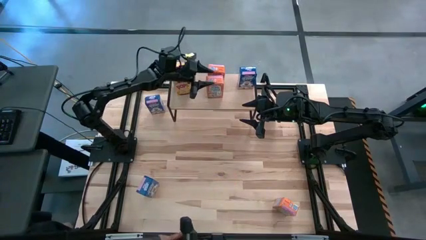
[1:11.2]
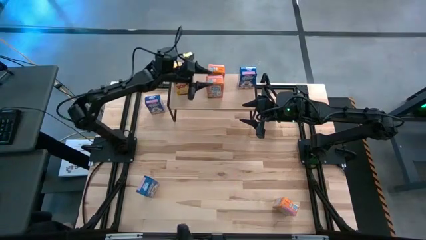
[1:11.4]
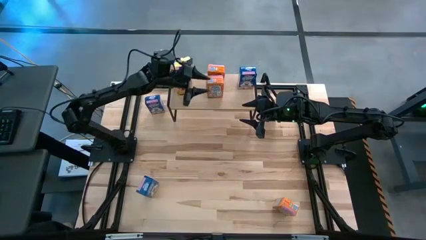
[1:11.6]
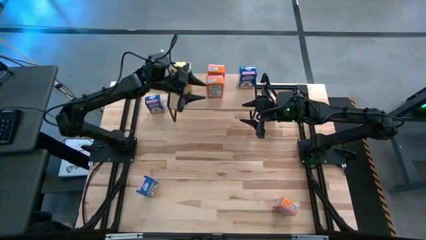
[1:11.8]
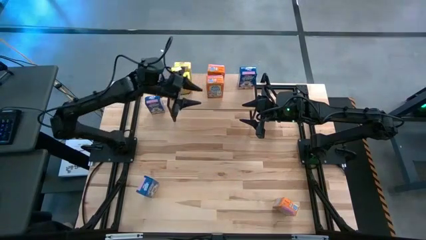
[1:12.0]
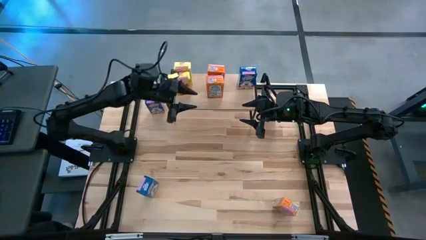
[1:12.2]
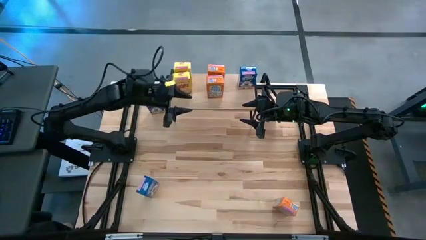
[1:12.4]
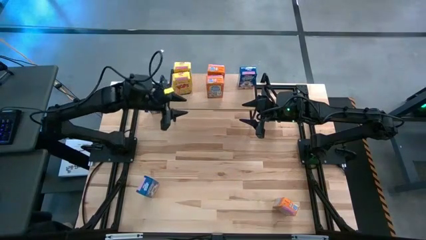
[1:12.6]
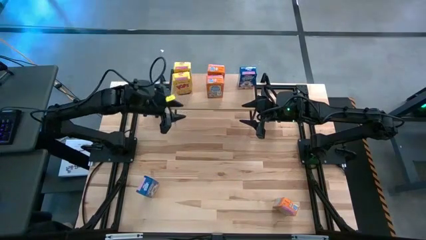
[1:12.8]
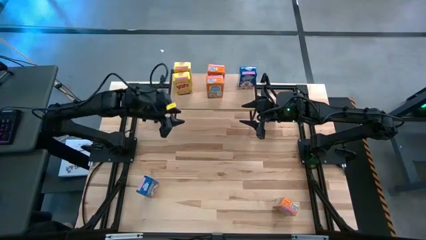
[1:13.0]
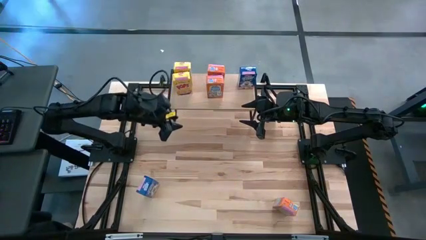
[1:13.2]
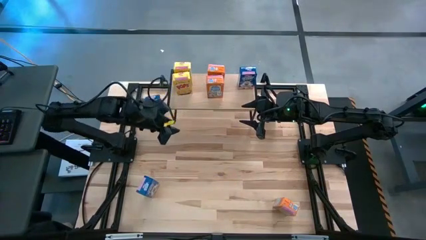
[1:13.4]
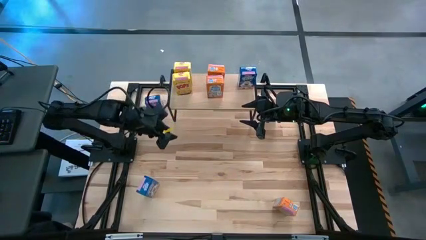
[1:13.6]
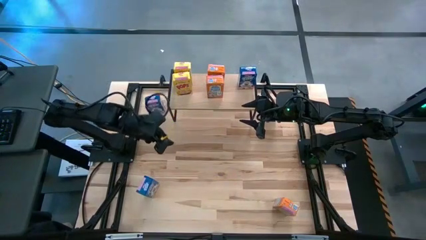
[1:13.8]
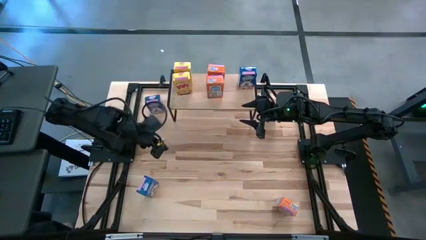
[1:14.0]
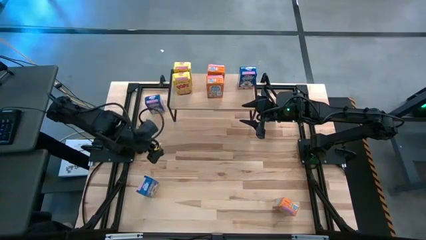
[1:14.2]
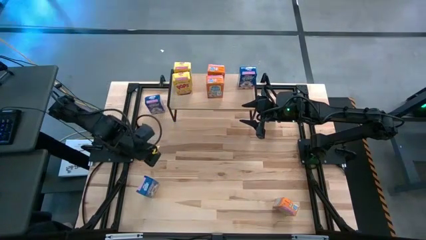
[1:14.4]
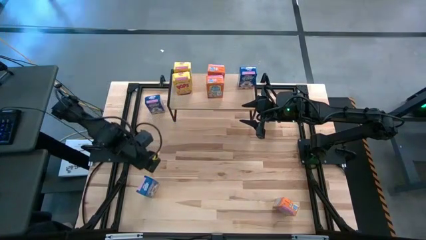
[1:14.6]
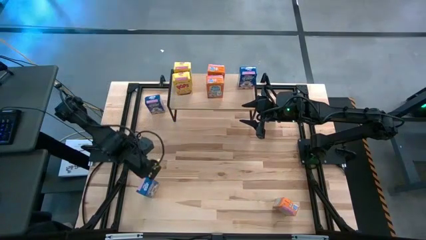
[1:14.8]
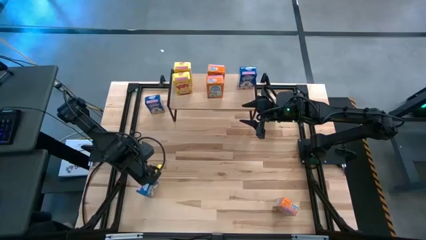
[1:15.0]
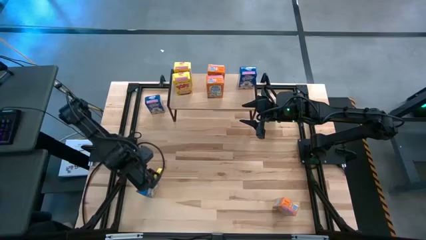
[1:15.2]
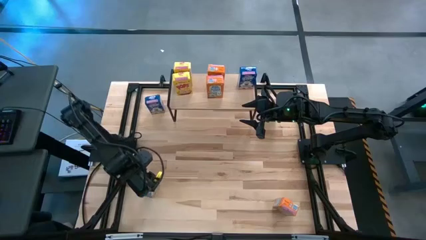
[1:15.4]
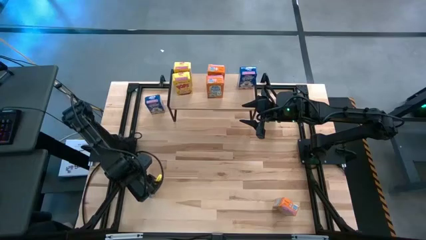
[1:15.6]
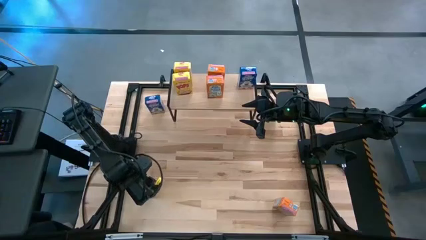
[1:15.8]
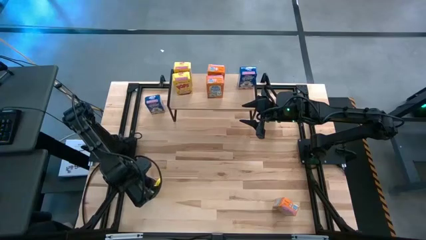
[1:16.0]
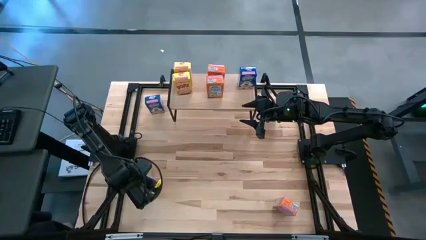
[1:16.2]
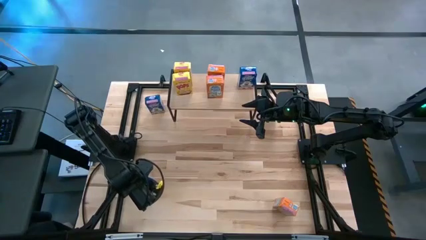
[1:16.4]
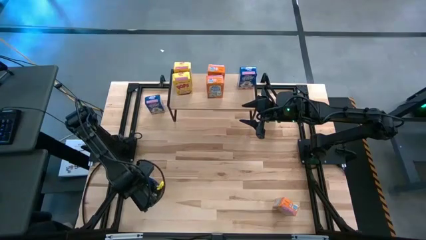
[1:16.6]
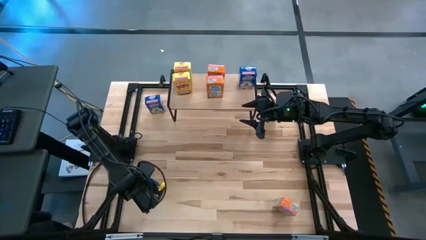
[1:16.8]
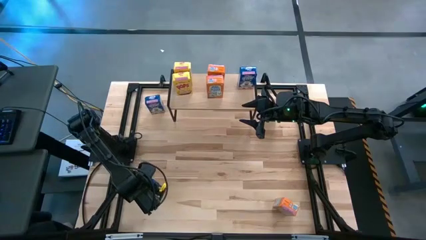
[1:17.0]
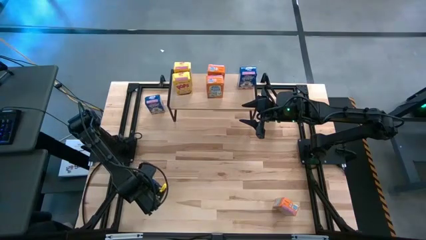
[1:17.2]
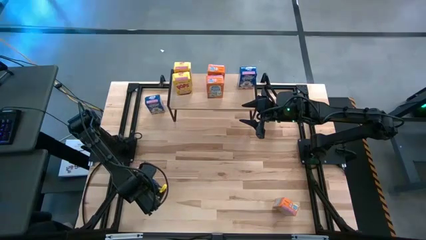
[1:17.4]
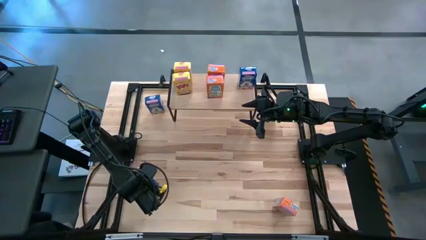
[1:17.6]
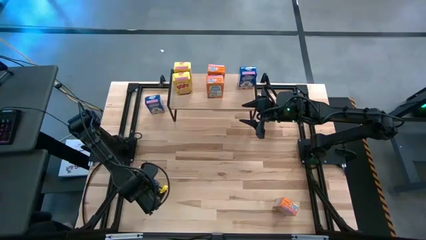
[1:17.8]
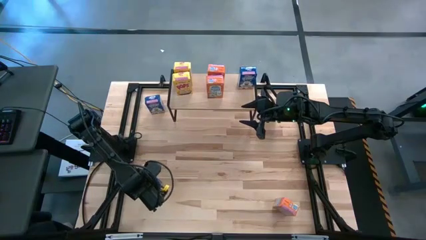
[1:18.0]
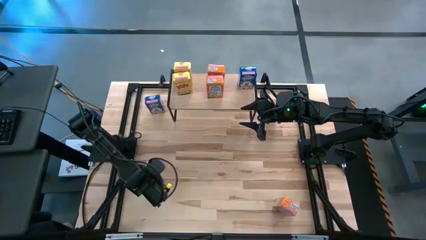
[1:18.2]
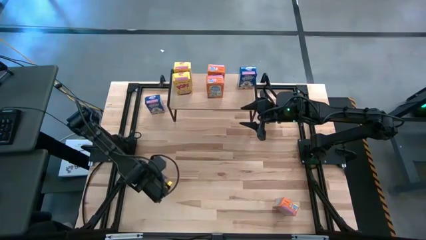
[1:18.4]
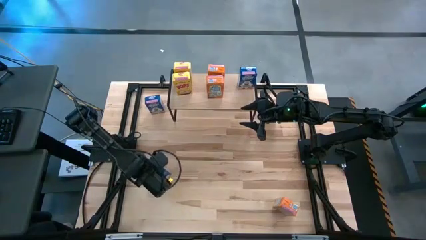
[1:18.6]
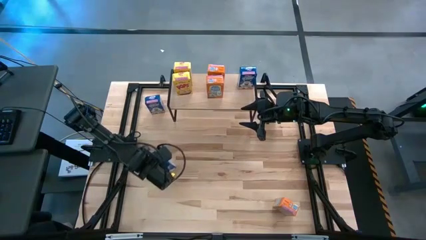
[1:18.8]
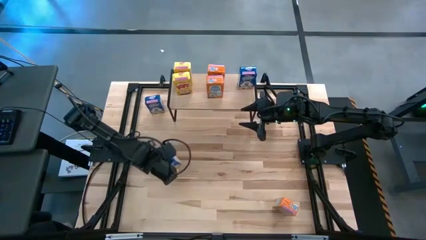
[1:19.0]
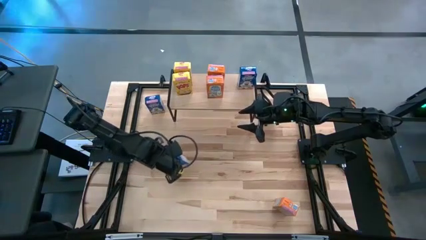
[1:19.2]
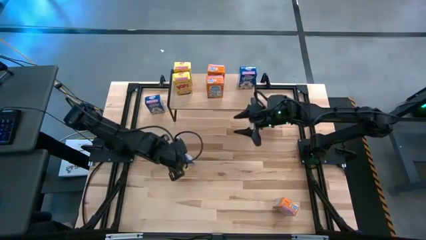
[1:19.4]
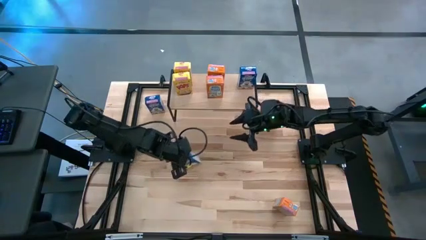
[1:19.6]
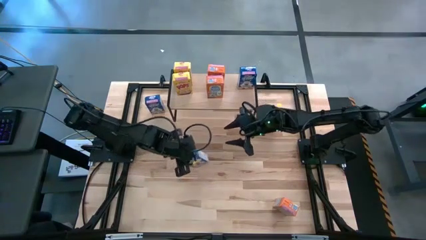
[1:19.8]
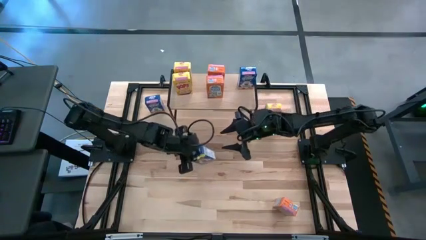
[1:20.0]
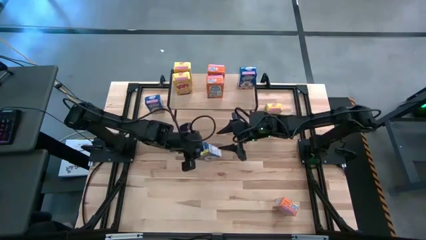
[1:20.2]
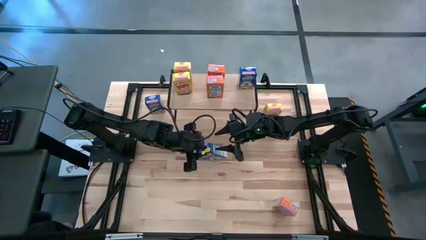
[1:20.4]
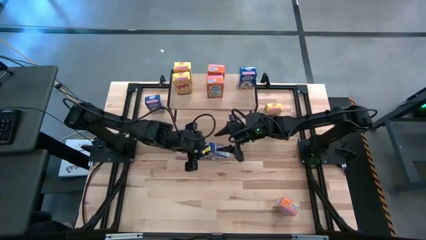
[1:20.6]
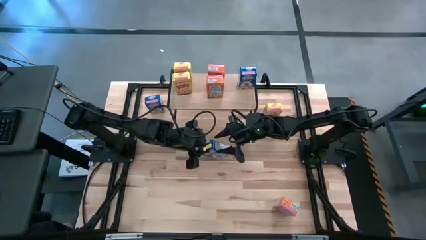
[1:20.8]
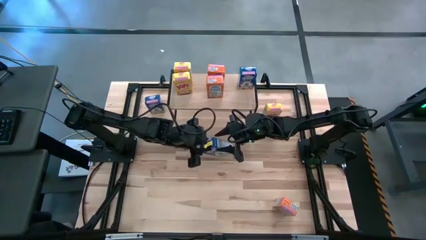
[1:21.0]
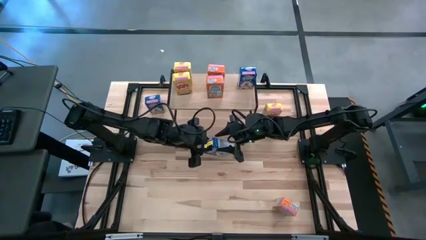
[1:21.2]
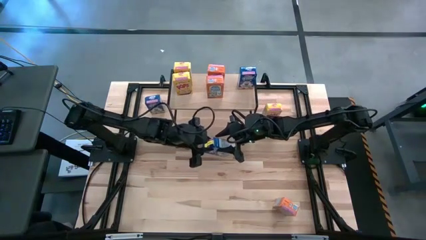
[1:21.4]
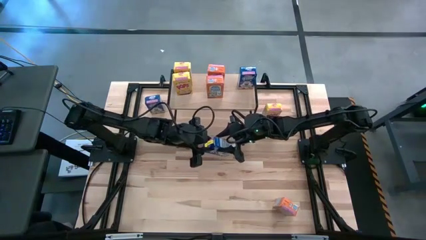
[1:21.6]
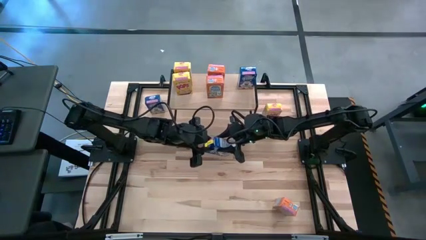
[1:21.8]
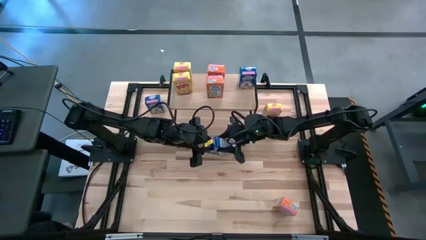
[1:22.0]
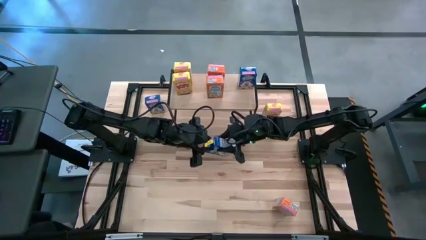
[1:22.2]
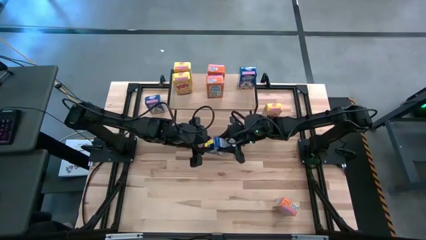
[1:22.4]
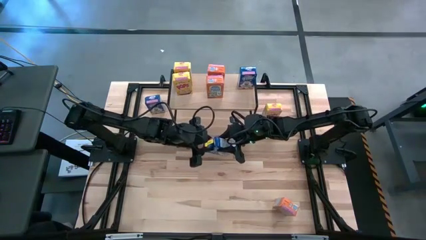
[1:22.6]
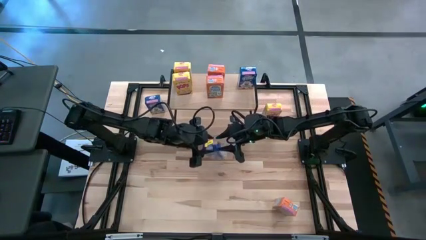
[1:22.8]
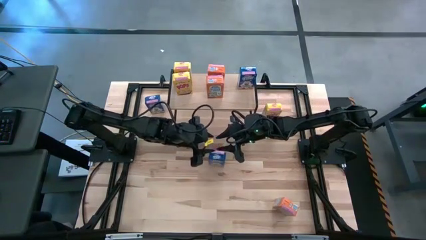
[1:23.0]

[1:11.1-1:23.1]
Task: Stack cereal on shelf
Put the bottom blue cereal box on the shelf aligned with the other blue cereal box
